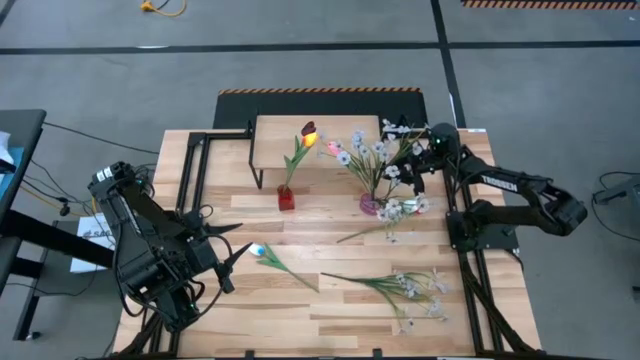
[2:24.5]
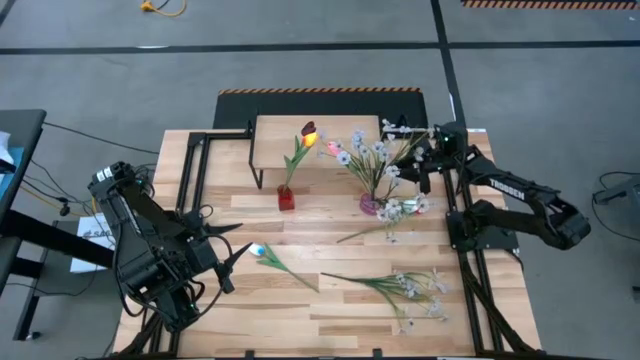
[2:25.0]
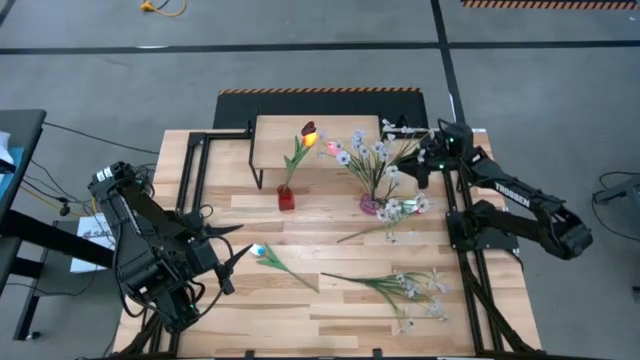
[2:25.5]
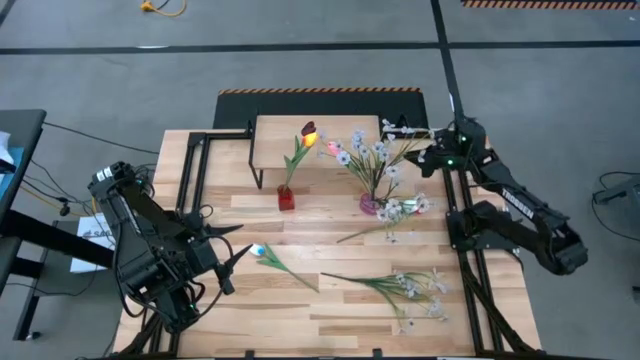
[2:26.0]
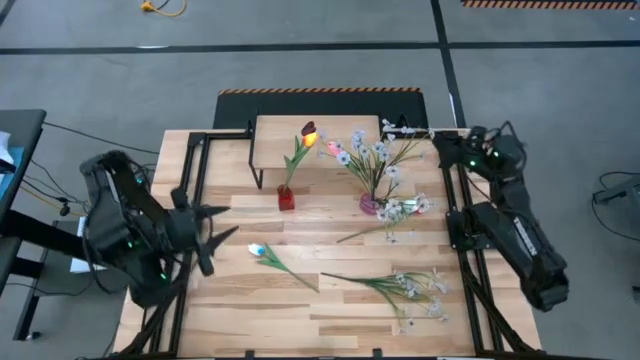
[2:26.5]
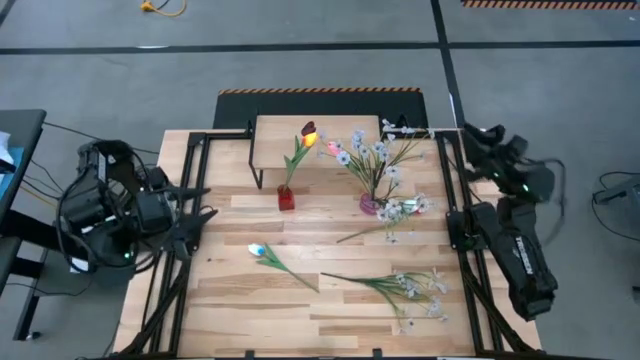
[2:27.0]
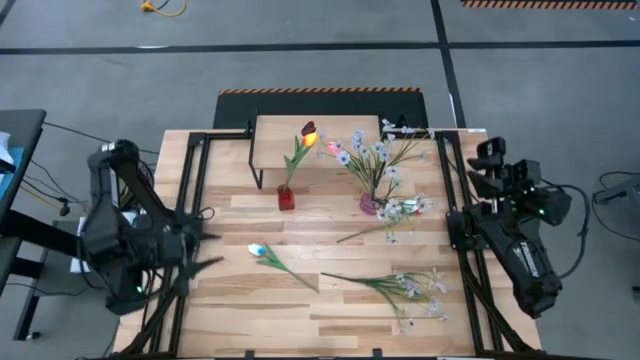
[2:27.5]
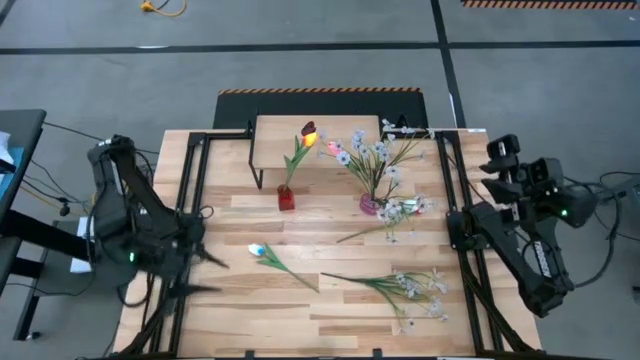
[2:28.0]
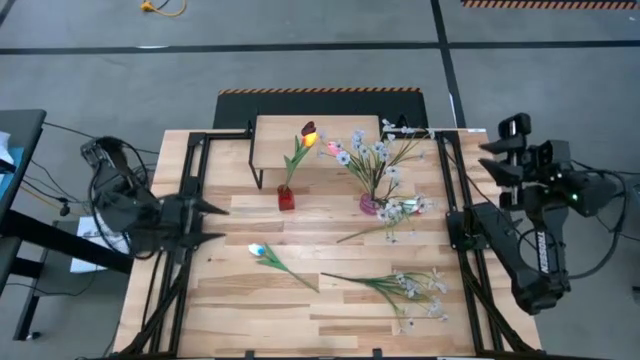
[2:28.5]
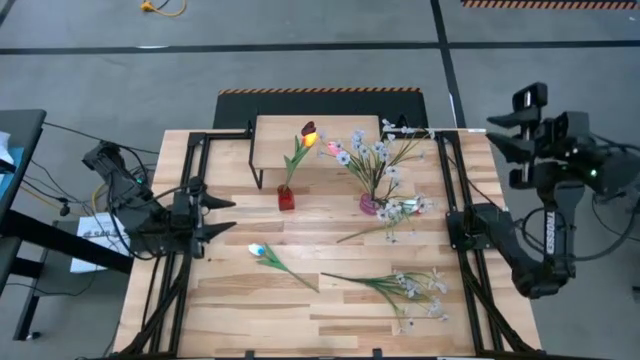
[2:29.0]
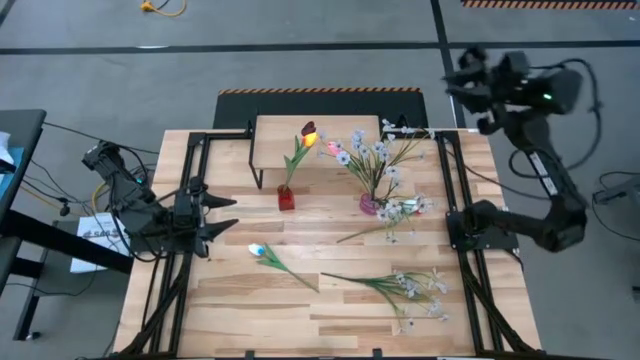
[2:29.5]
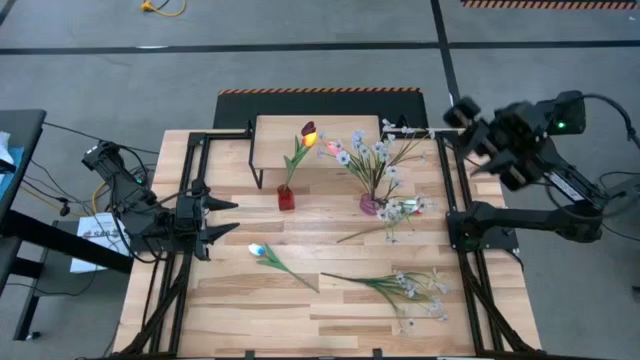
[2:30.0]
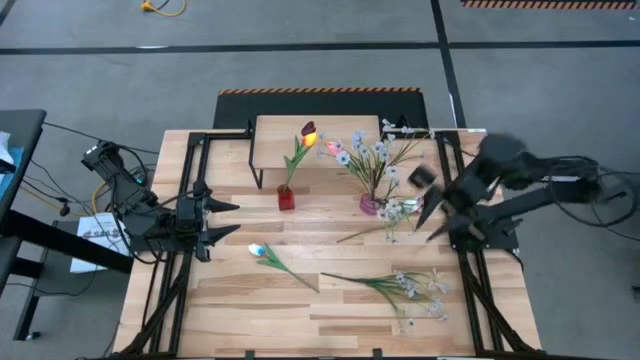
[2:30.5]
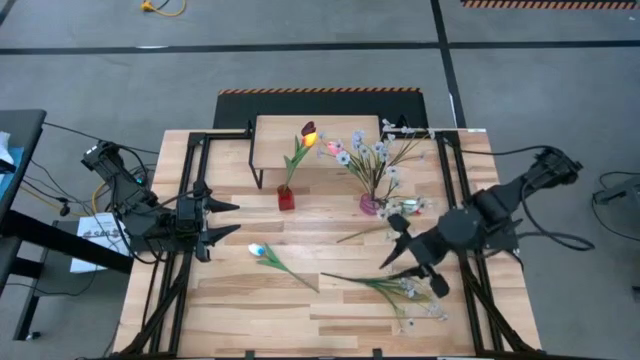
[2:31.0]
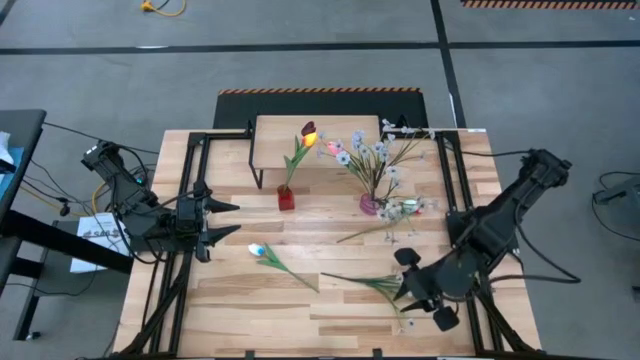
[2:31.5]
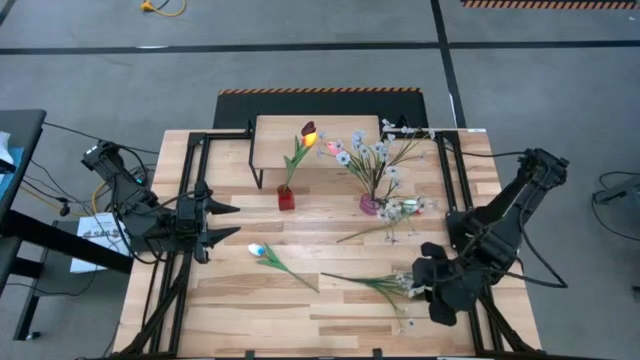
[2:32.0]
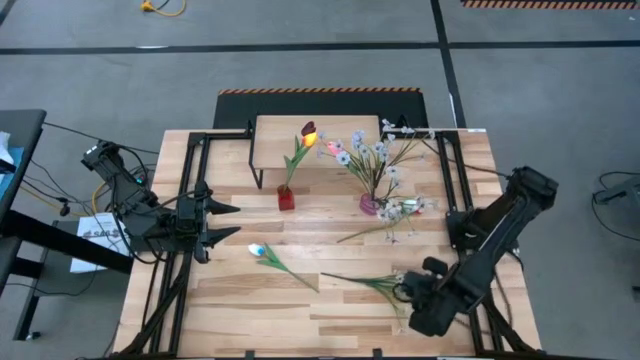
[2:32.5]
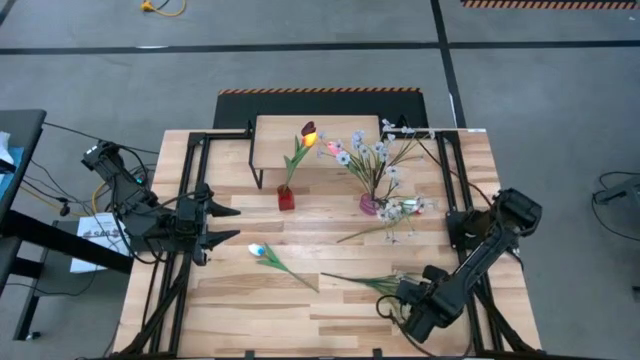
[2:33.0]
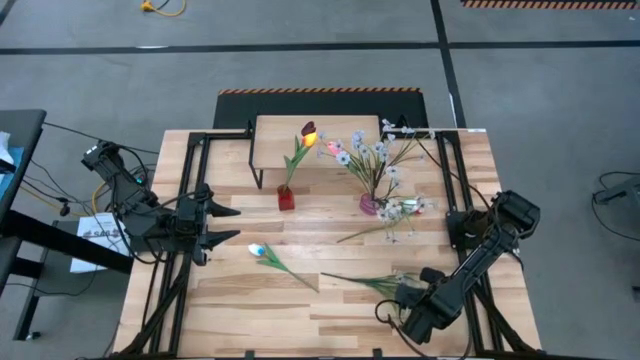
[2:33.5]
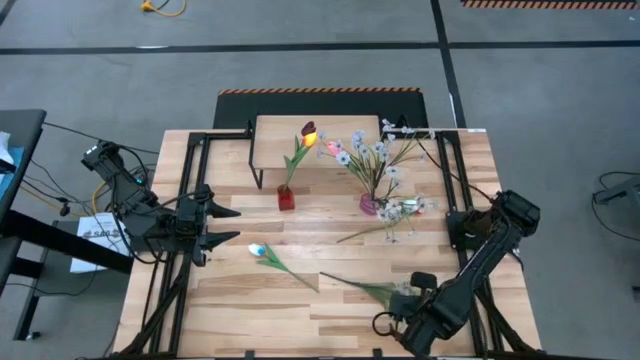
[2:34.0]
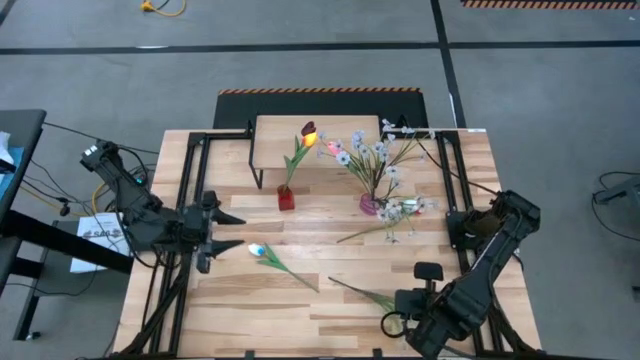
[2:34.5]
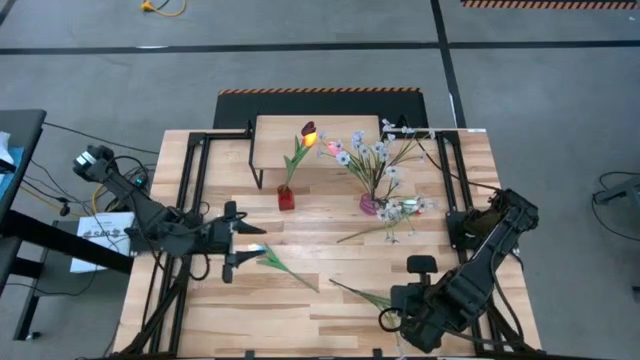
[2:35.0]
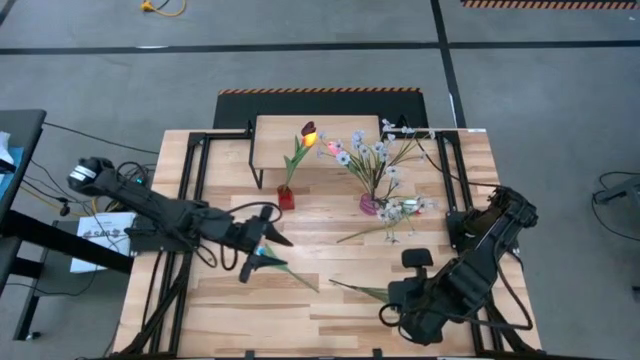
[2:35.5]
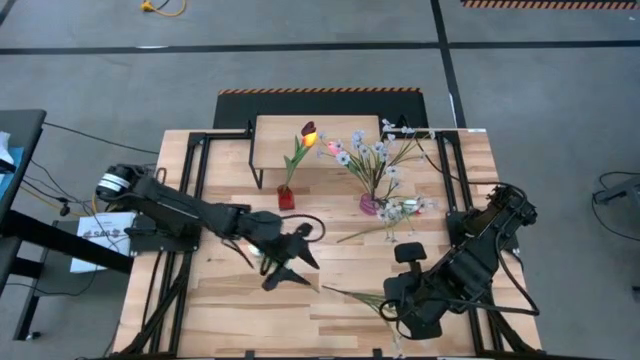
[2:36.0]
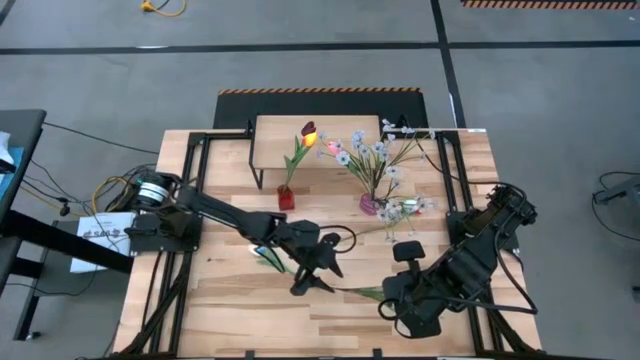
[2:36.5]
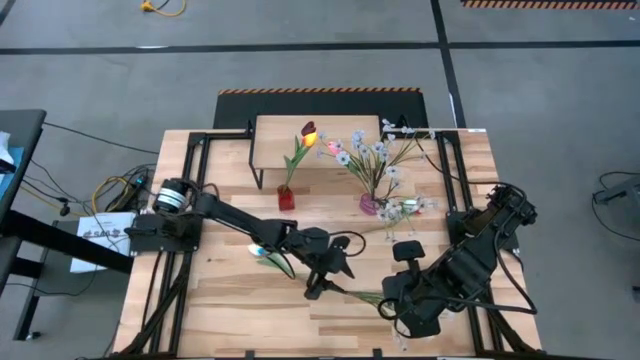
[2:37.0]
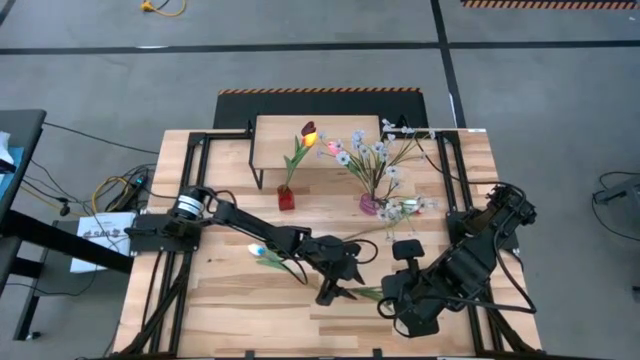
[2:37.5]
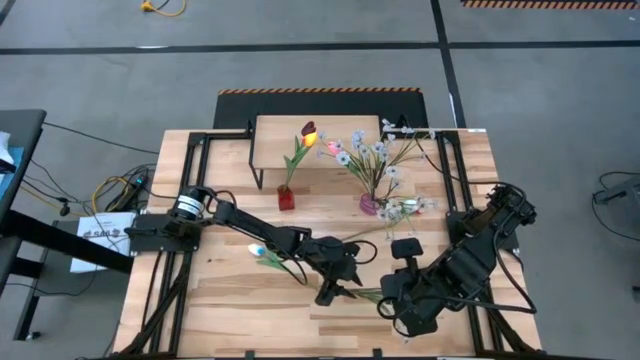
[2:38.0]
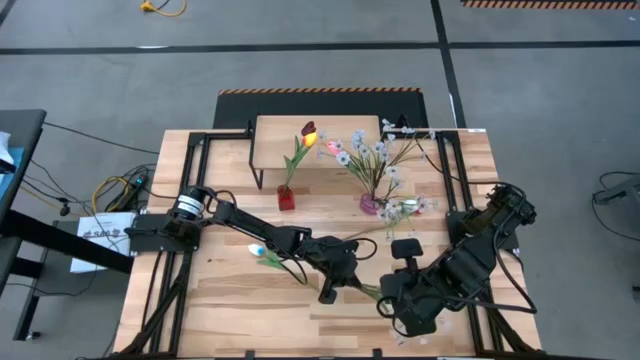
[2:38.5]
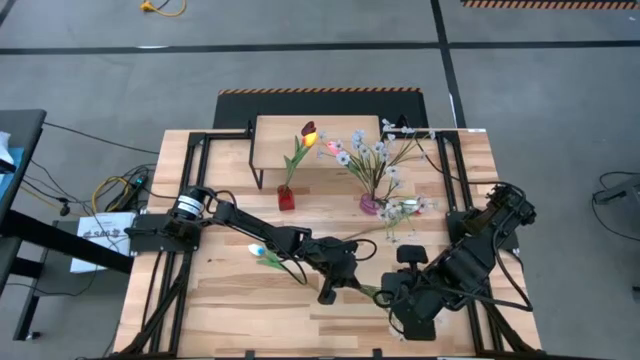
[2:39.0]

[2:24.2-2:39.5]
Task: Pick and place flowers into a vace then onto a shelf
Put the white flowers into the red vase

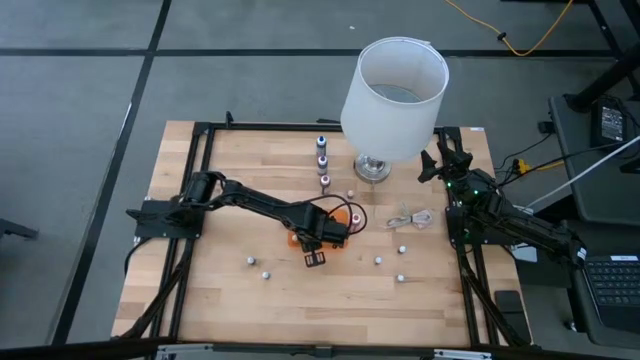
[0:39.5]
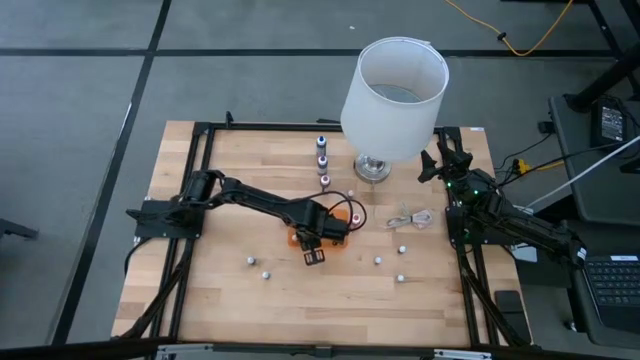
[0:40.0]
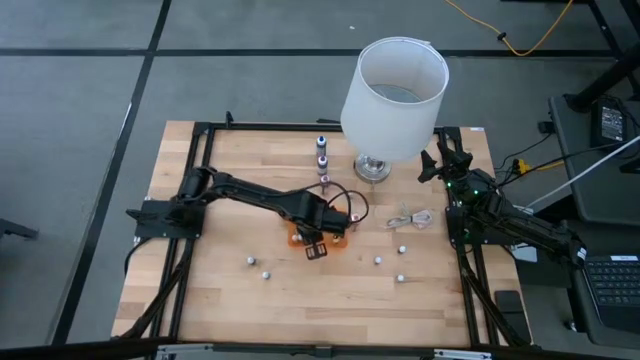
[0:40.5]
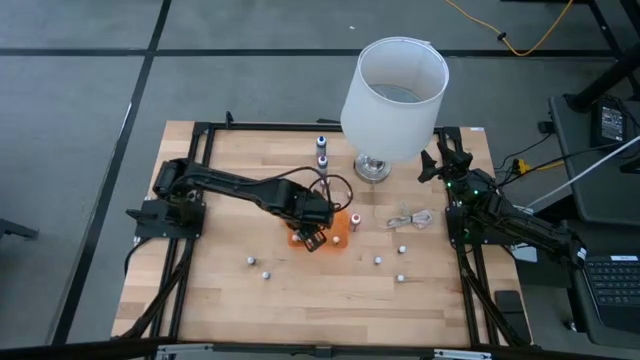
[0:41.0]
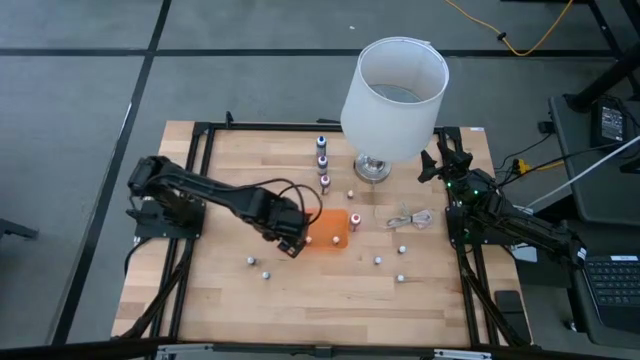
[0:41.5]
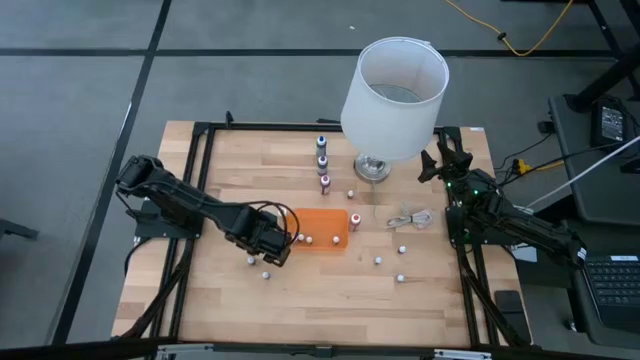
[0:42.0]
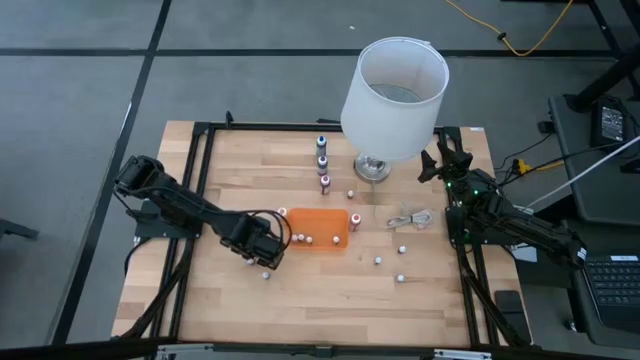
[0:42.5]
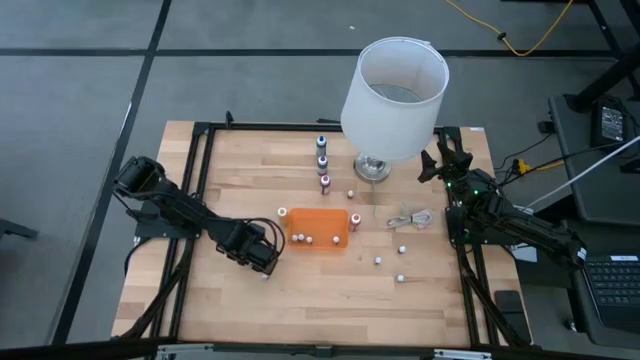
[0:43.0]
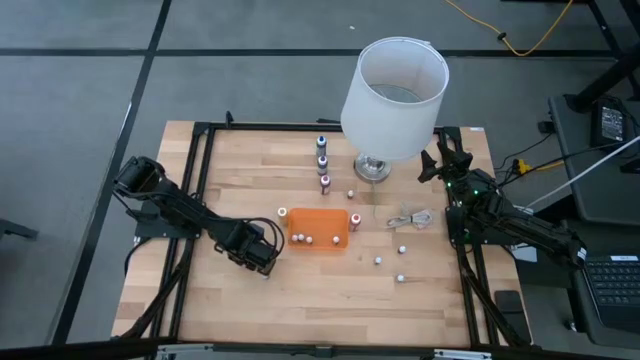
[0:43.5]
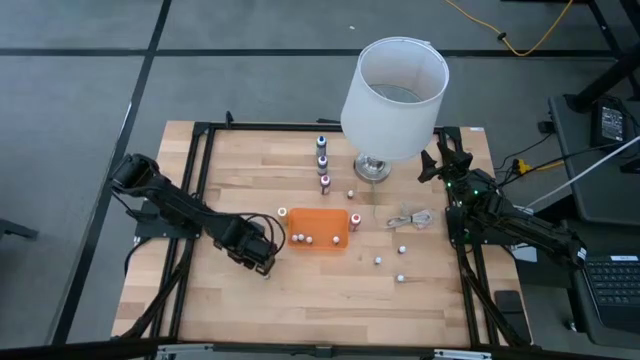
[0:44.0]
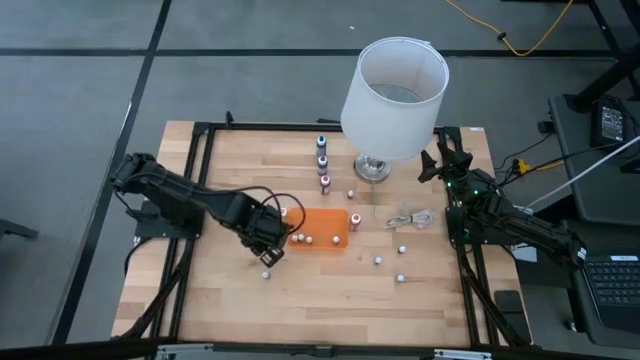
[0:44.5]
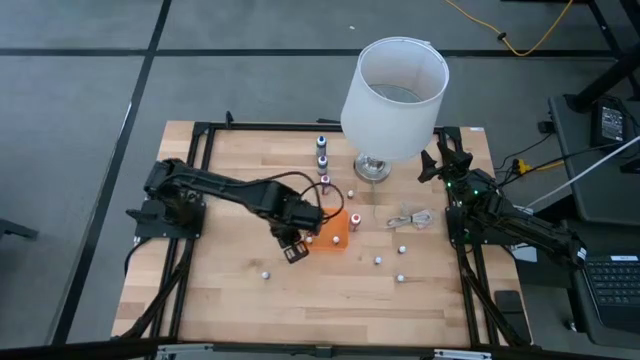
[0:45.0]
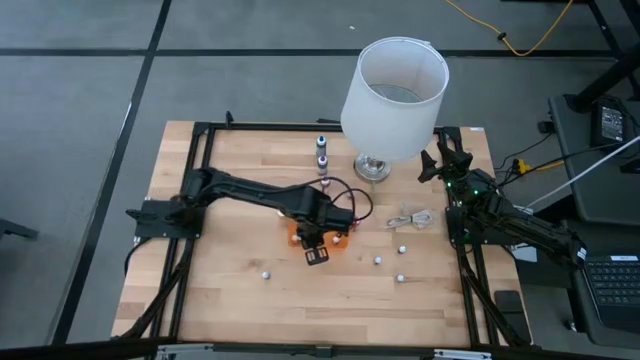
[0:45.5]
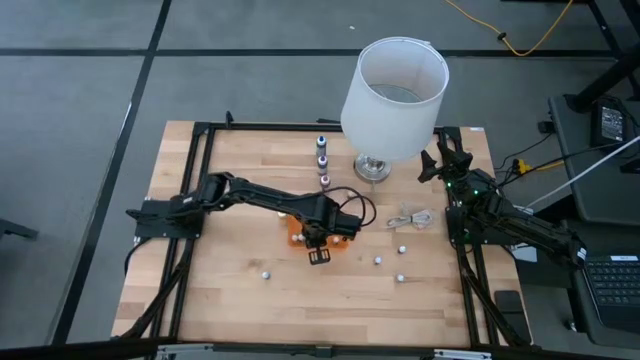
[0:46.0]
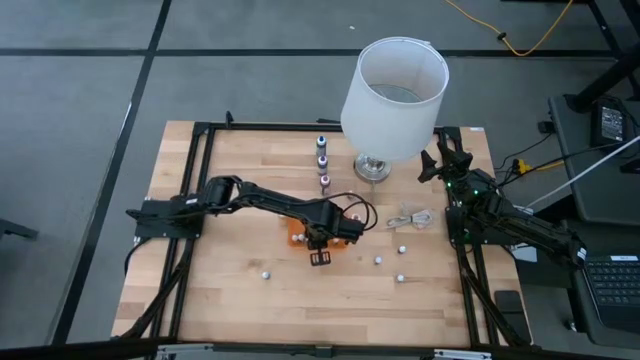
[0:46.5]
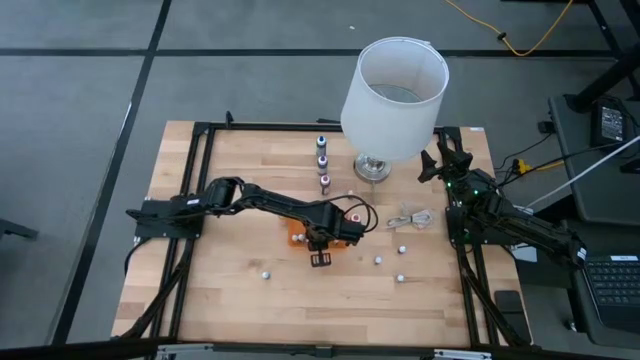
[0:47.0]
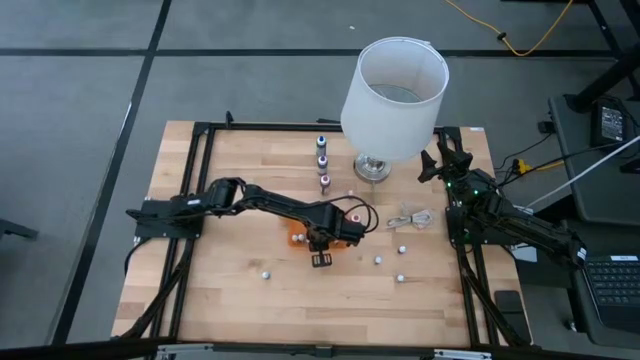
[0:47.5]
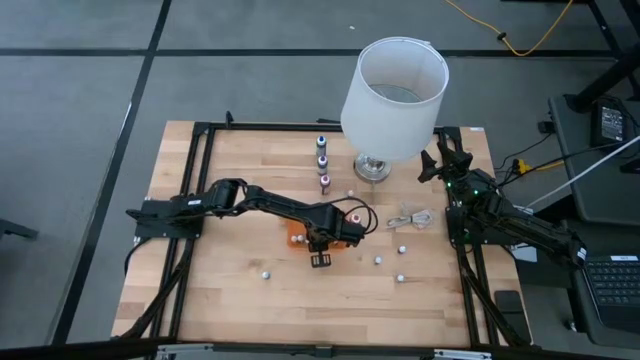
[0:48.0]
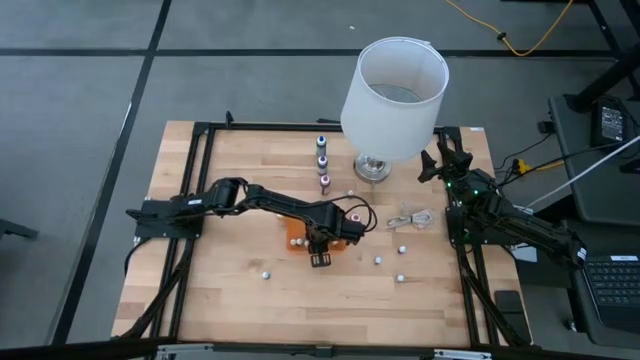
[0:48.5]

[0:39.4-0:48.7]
Task: Pick & Place food coloring
Put the top left small blue food coloring bottle into the orange bin
